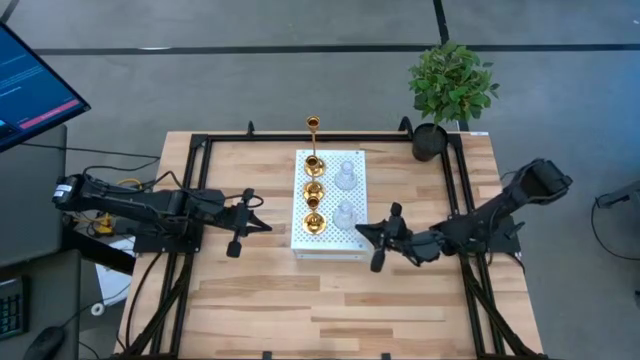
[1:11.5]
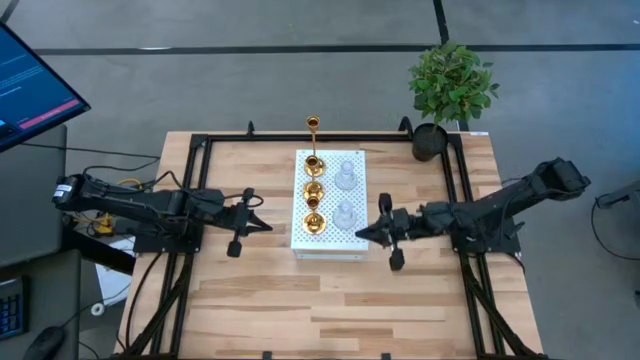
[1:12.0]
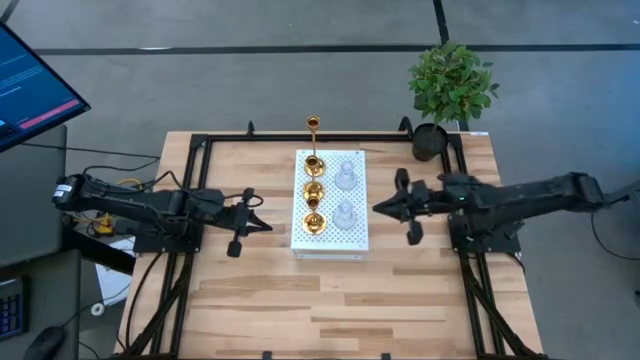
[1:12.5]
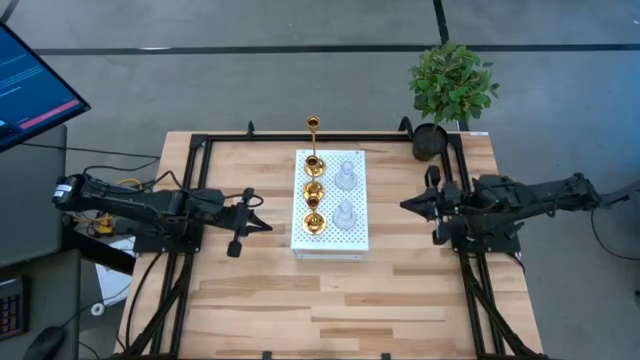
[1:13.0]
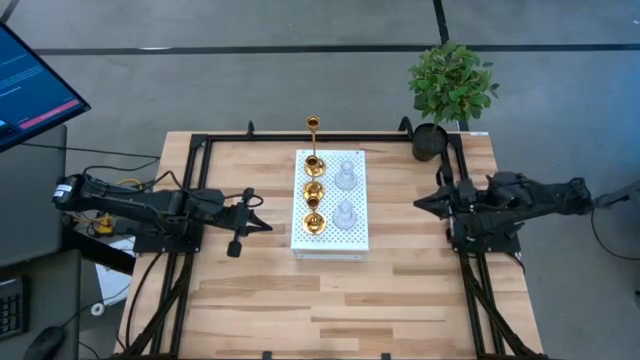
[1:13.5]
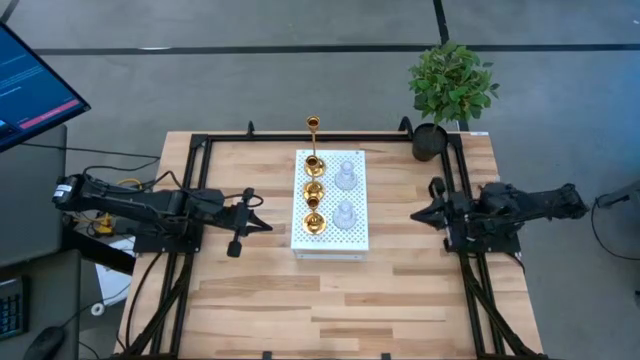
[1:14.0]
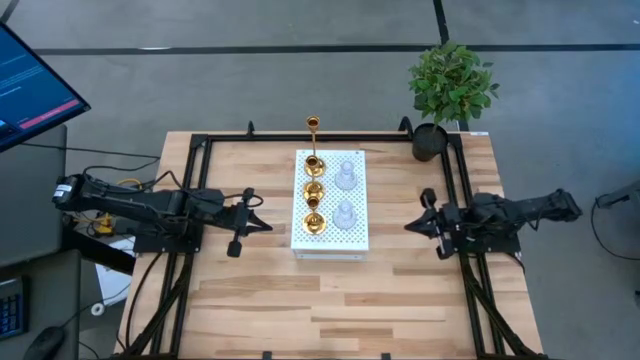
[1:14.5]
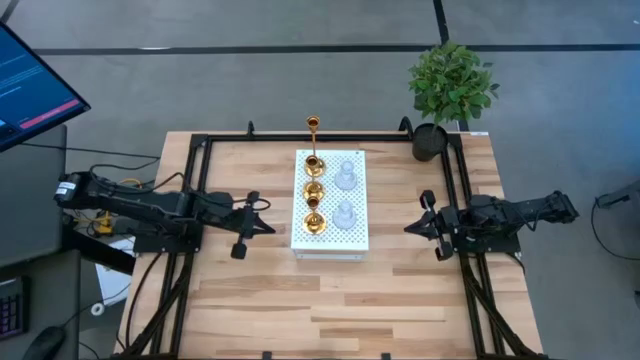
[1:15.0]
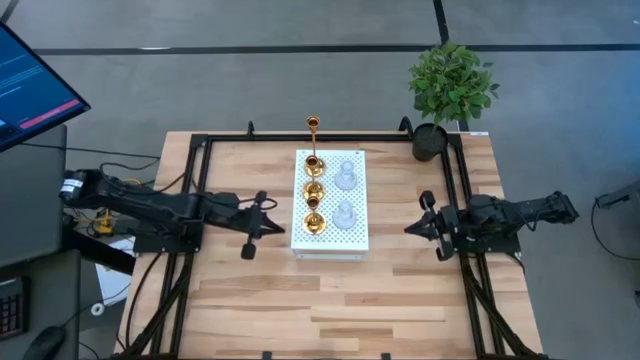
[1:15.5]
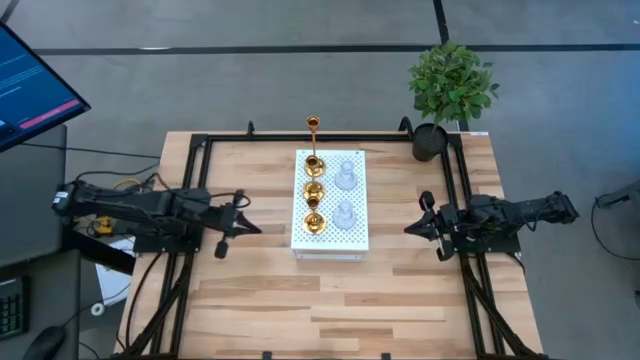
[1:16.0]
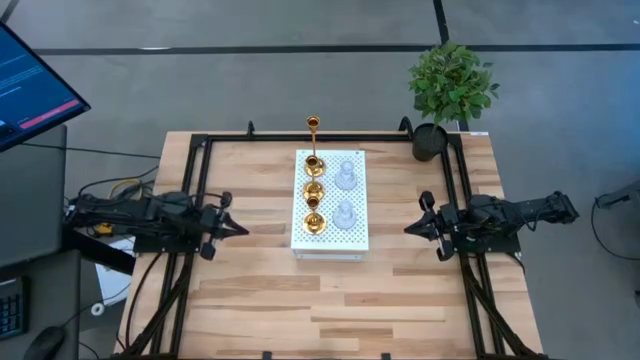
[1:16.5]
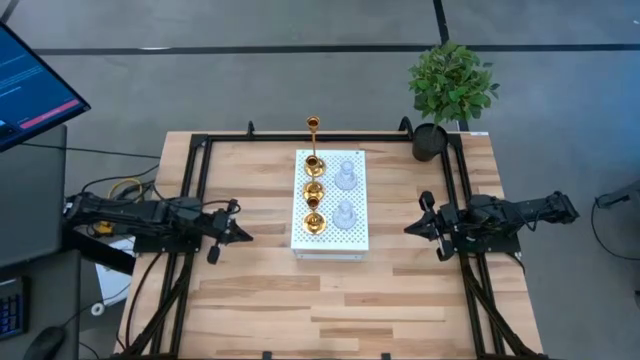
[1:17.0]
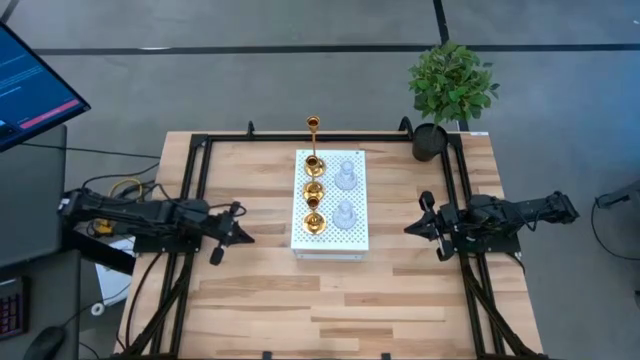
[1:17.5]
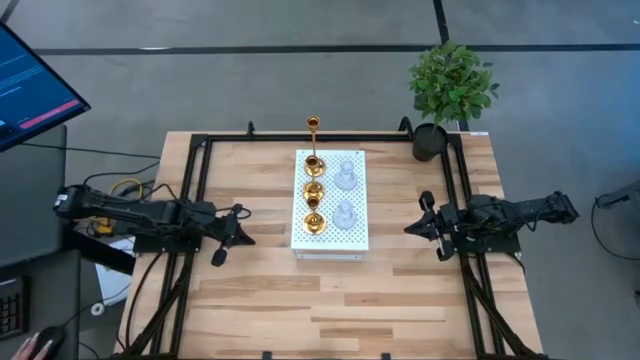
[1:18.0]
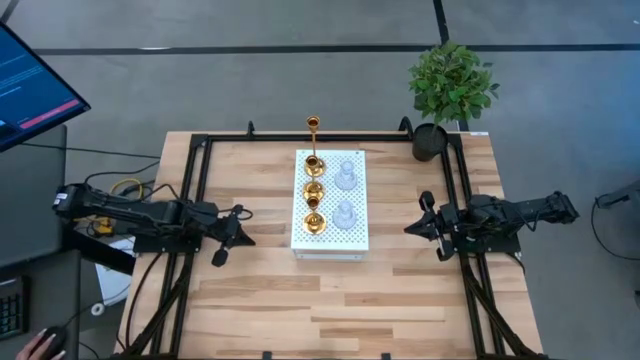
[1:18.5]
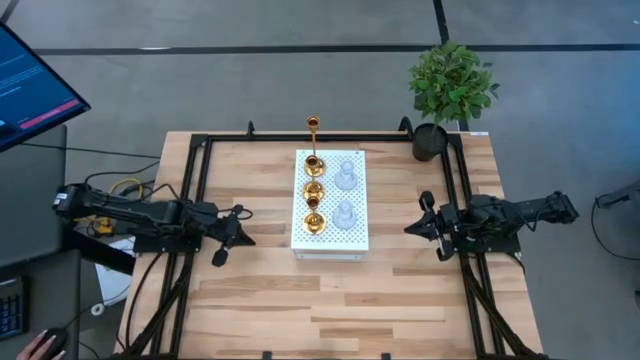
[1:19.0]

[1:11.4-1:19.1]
Task: Pick & Place candle stick holders
Return to Home Position

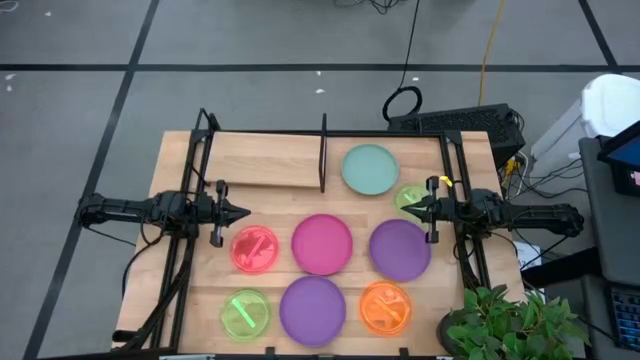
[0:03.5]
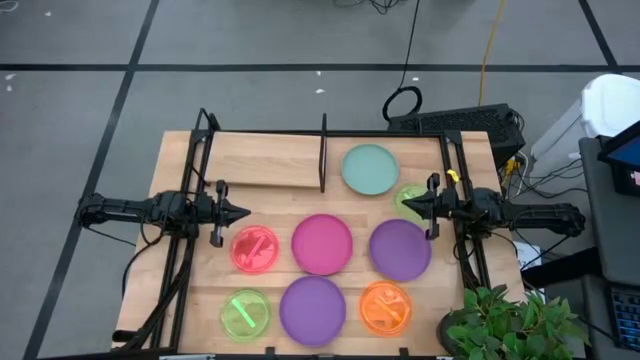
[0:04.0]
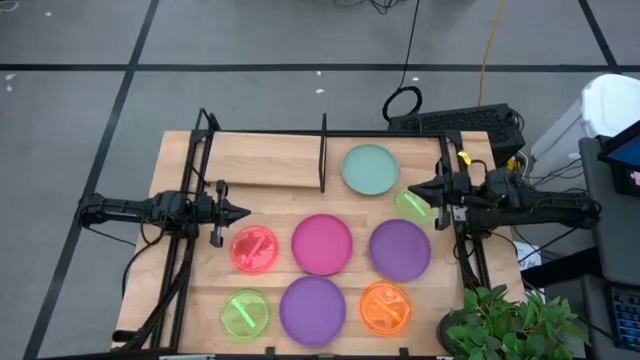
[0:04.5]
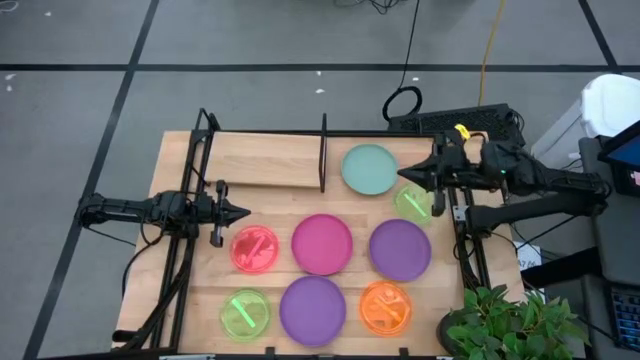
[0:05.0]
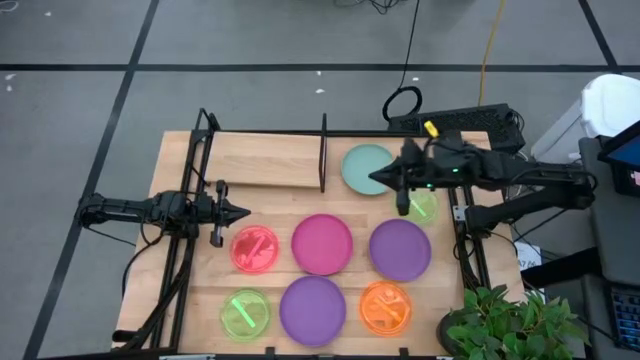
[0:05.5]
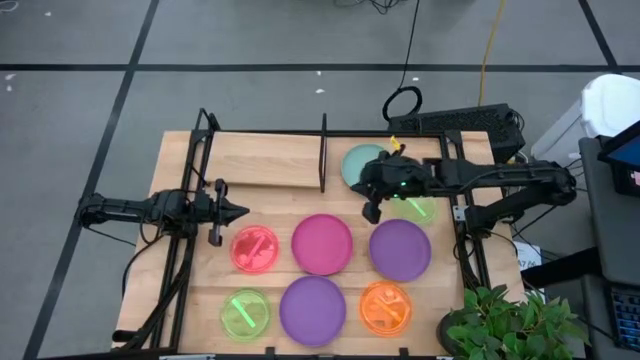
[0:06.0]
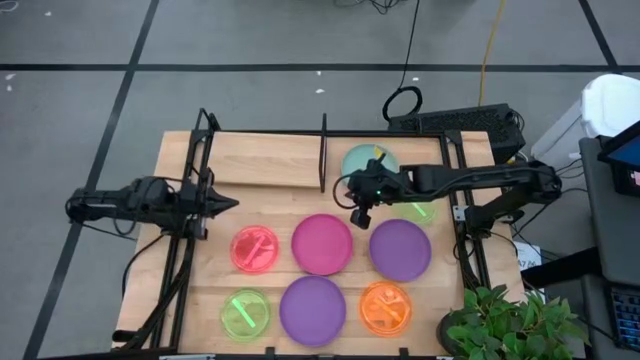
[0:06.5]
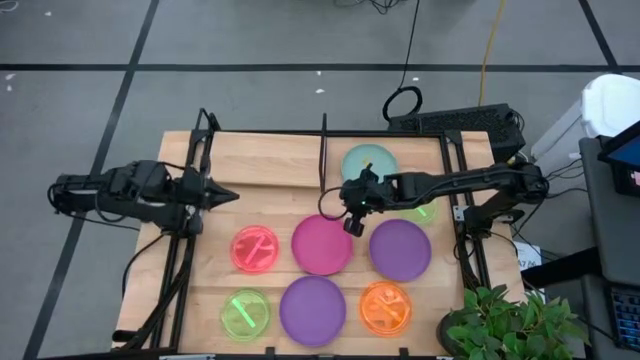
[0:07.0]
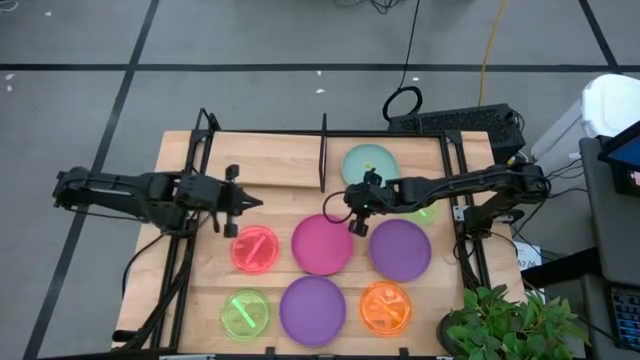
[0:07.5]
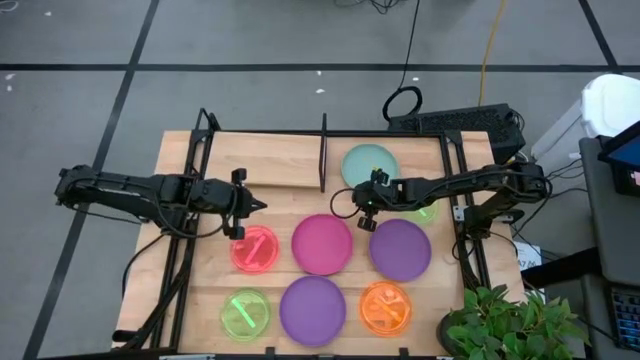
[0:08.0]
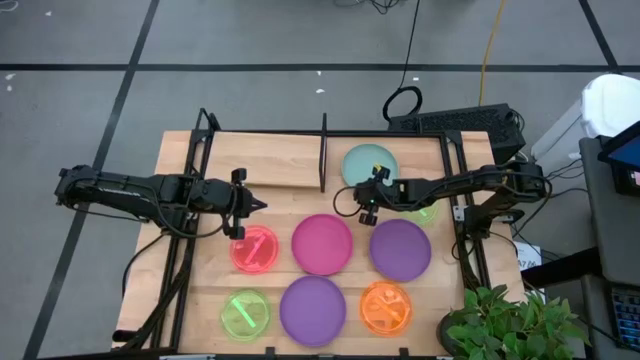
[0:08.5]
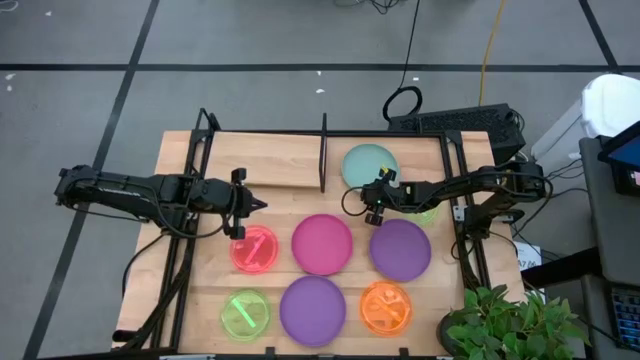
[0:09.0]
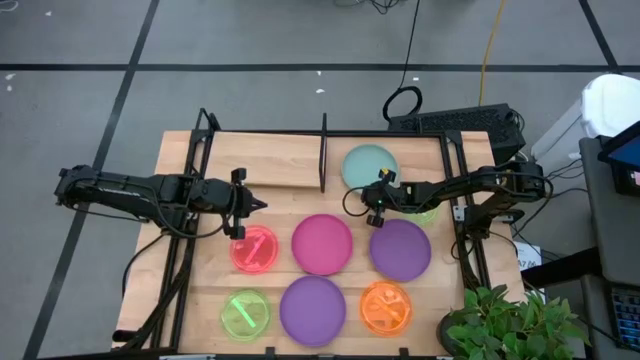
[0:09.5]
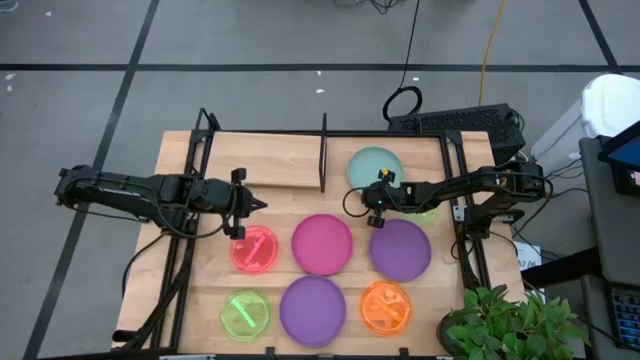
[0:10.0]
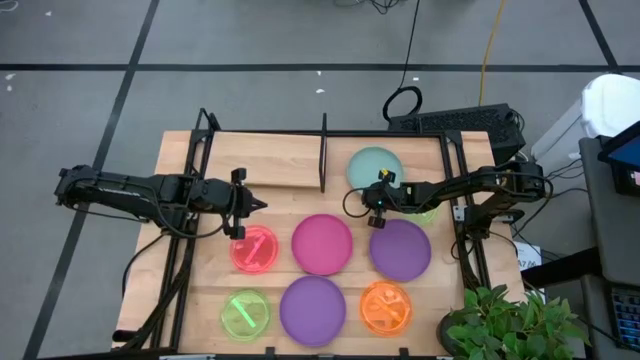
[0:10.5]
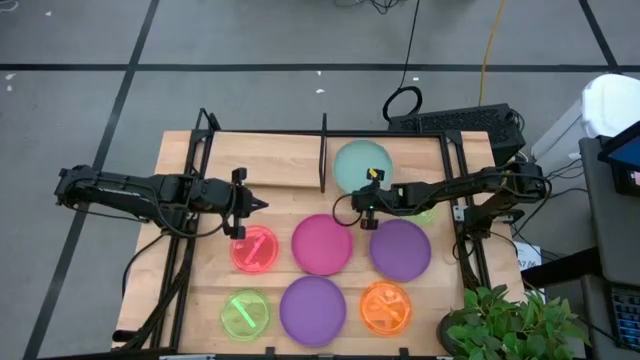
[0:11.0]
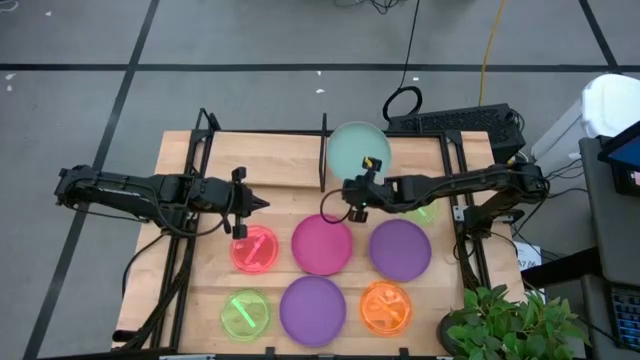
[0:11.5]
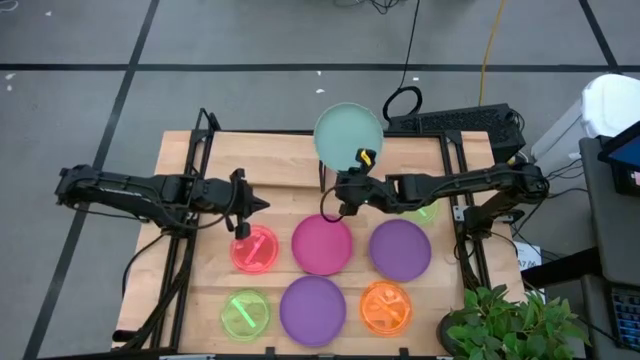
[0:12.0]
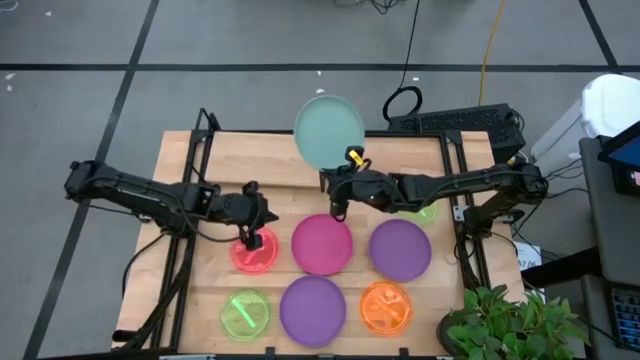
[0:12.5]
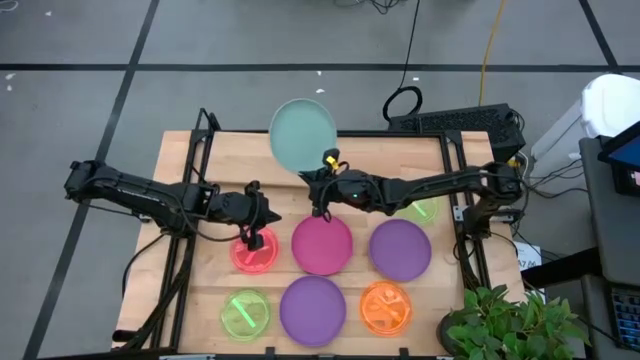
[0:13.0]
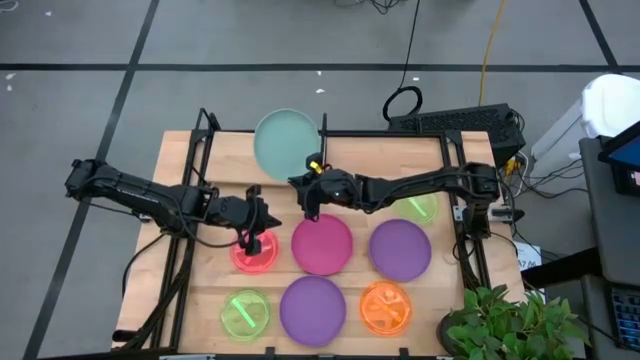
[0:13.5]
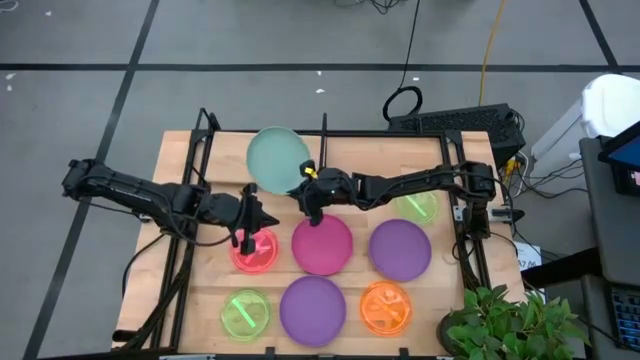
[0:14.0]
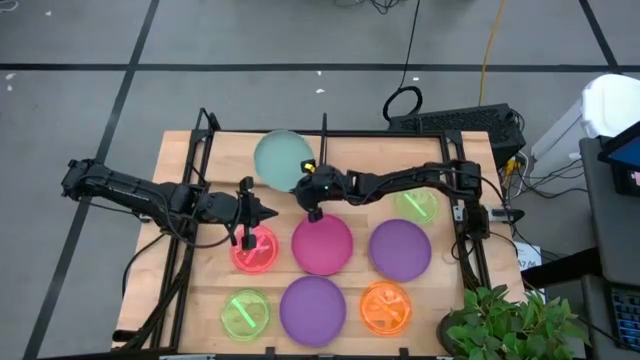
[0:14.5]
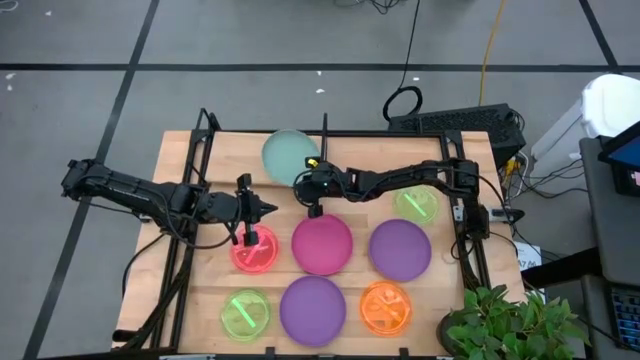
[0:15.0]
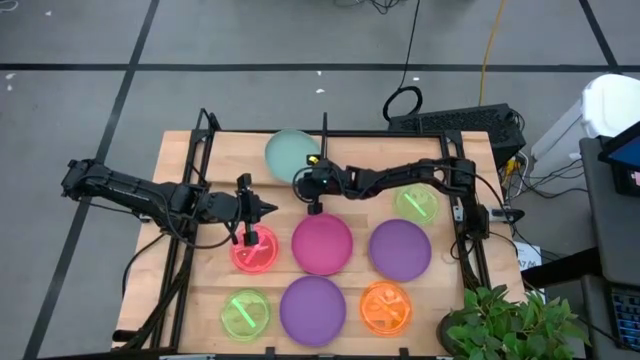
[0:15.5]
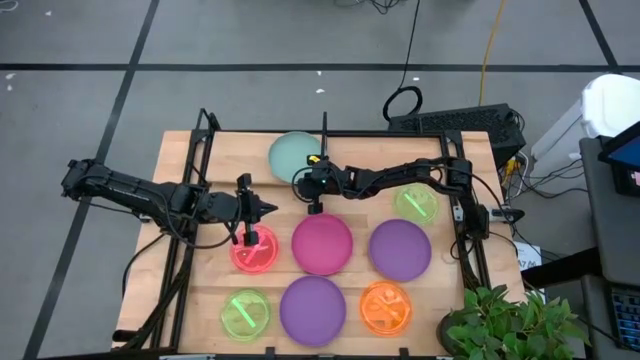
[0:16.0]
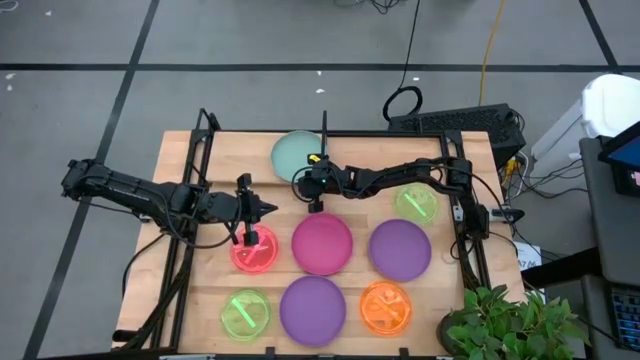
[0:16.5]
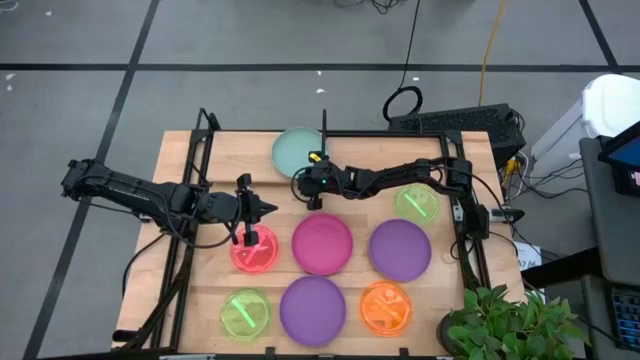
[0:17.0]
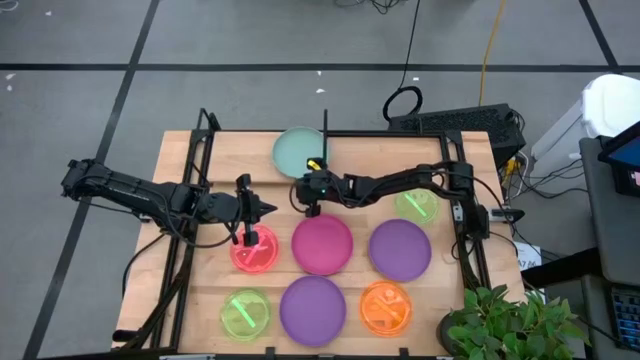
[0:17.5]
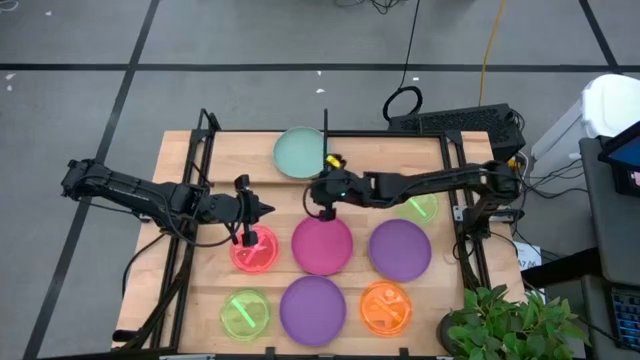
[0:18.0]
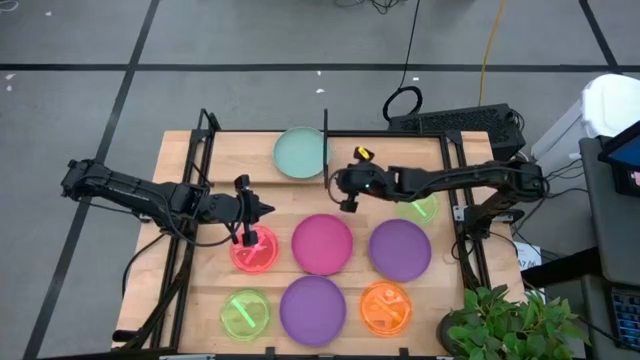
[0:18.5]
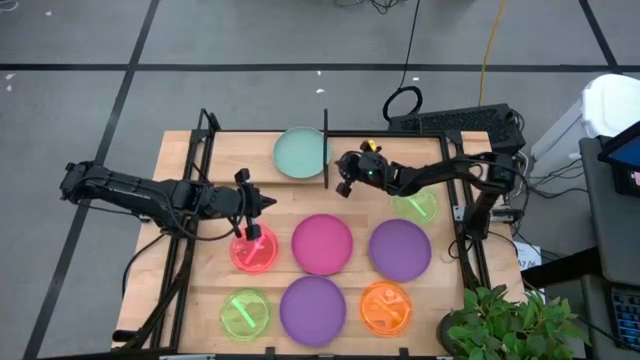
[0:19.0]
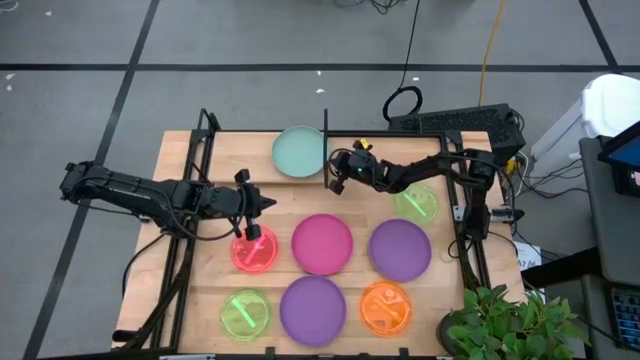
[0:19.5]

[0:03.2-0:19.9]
Task: Place and stack plates onto a shelf
Put the blue plate on the shelf
